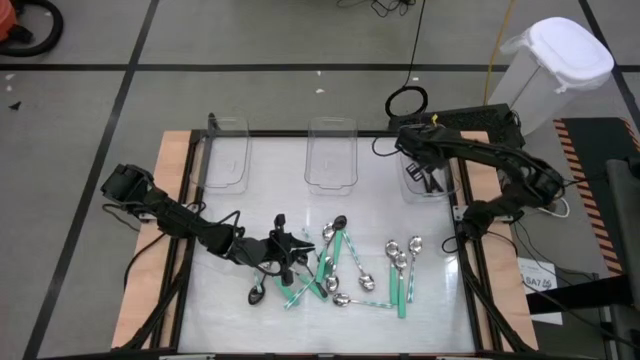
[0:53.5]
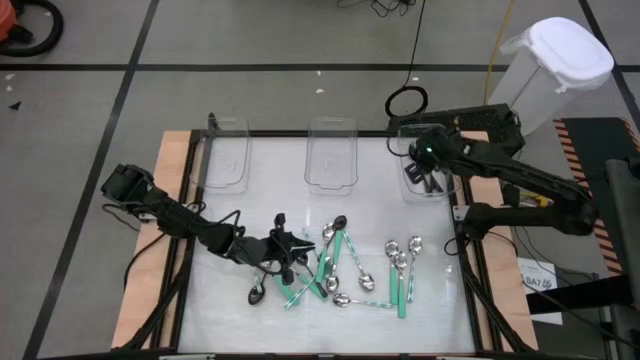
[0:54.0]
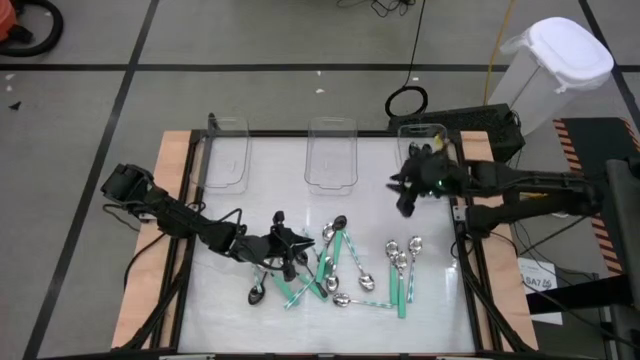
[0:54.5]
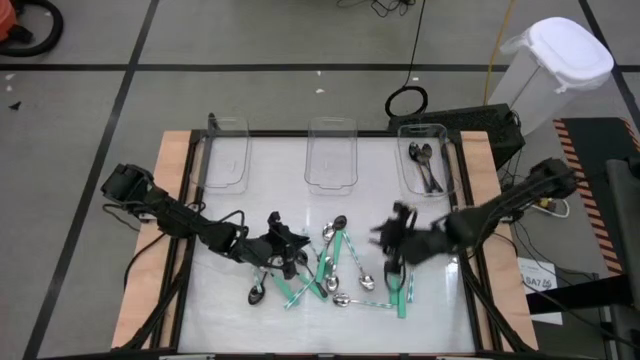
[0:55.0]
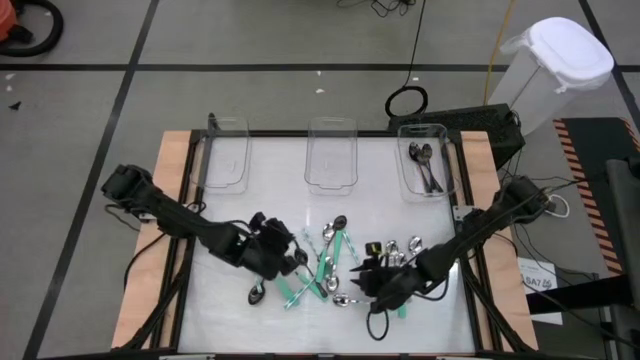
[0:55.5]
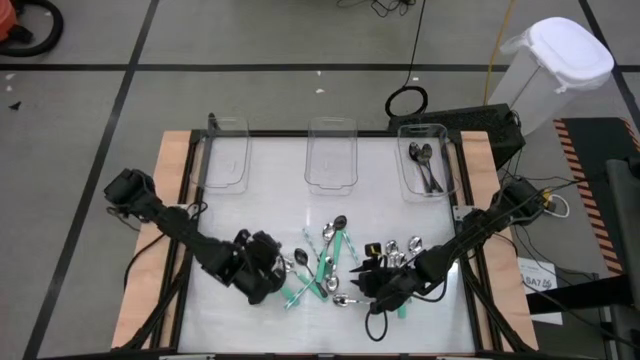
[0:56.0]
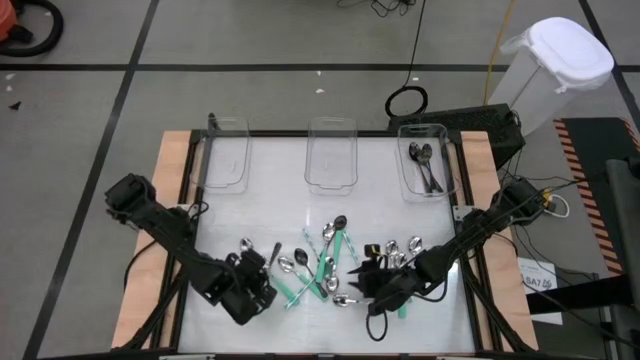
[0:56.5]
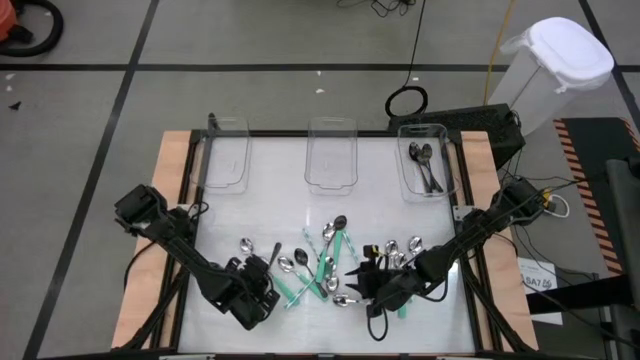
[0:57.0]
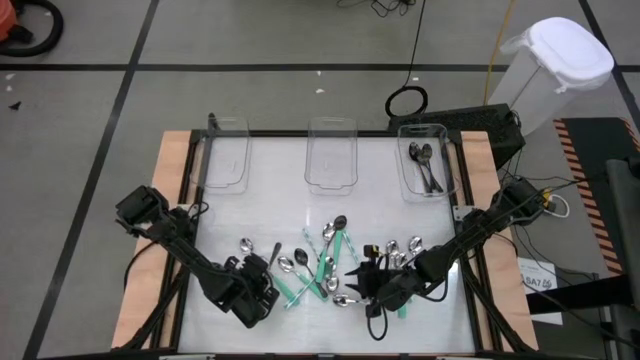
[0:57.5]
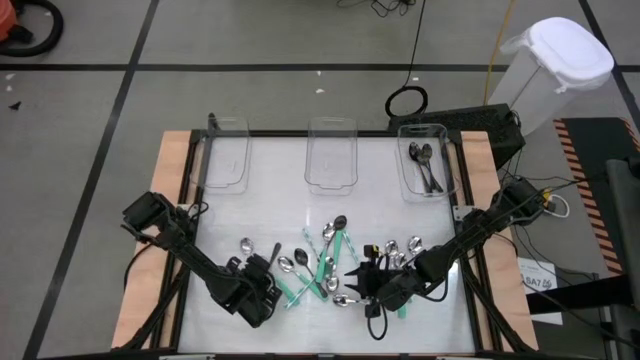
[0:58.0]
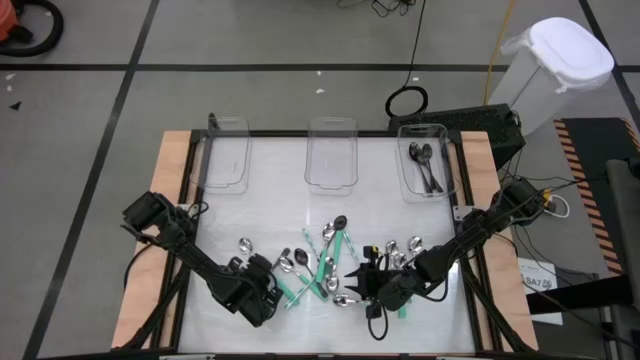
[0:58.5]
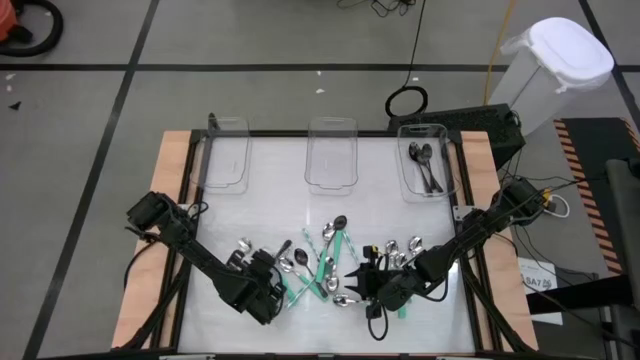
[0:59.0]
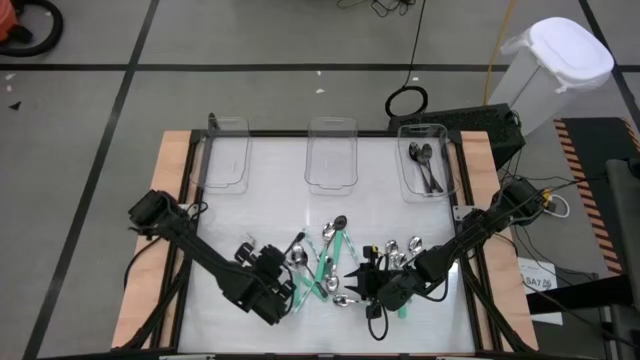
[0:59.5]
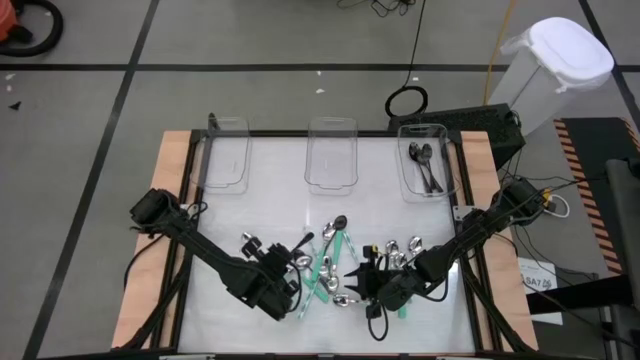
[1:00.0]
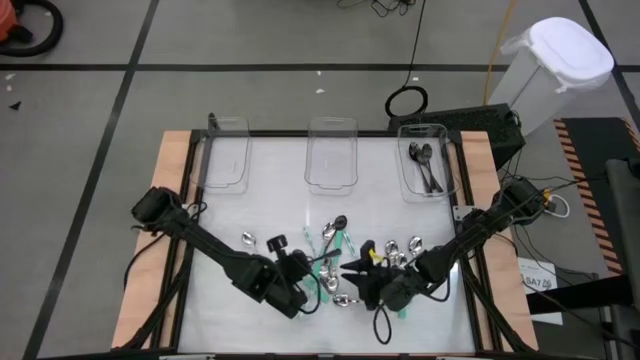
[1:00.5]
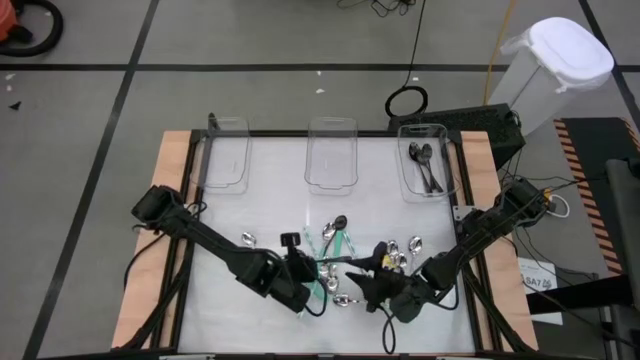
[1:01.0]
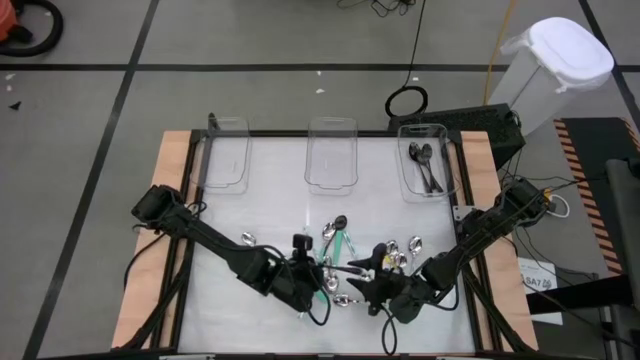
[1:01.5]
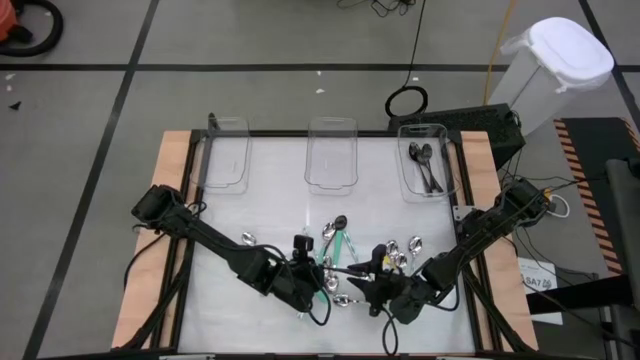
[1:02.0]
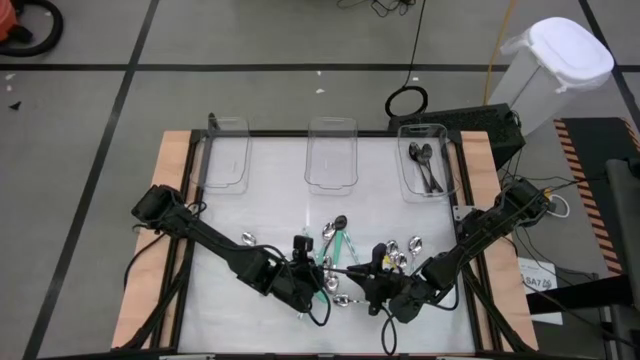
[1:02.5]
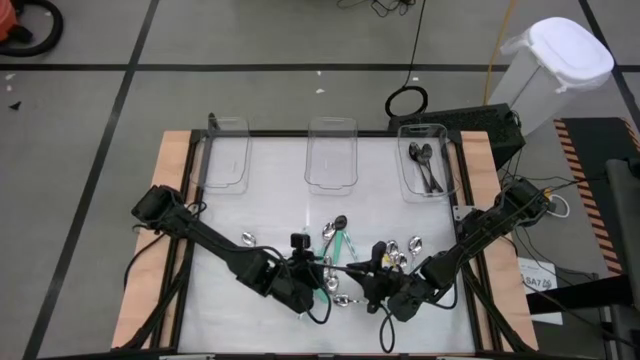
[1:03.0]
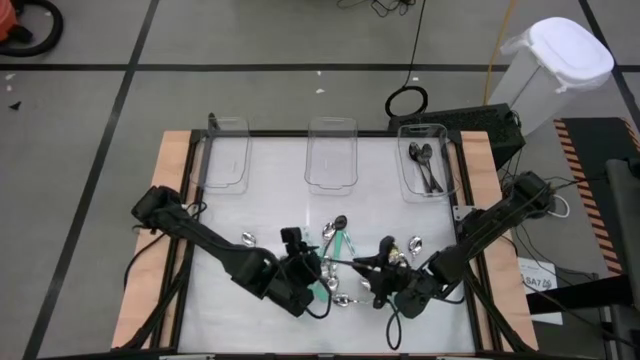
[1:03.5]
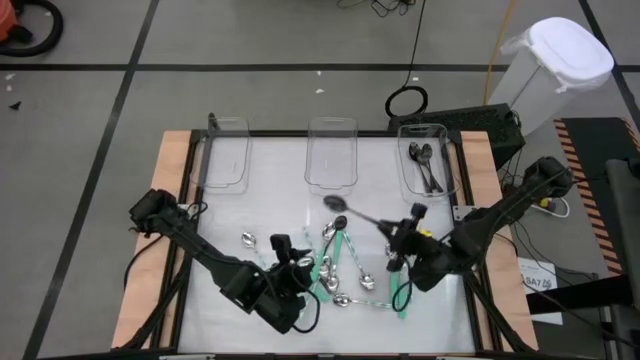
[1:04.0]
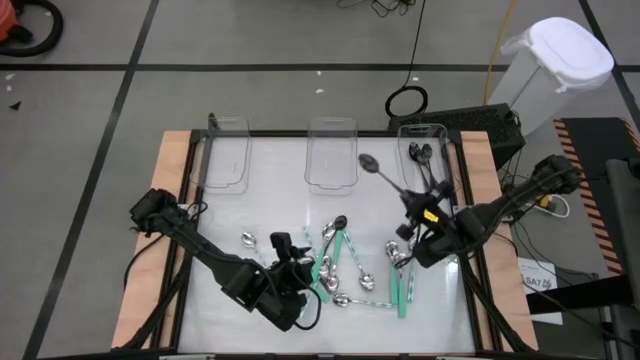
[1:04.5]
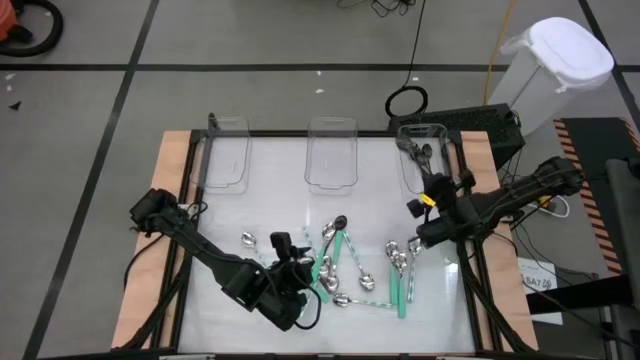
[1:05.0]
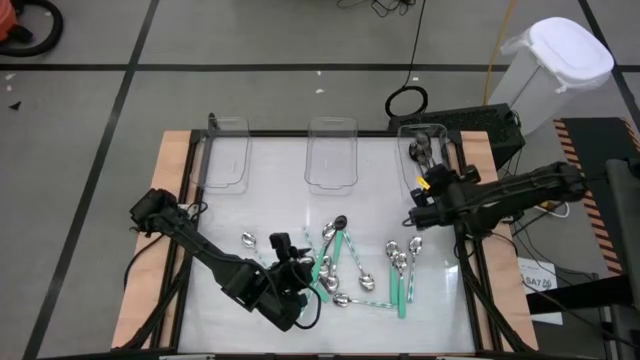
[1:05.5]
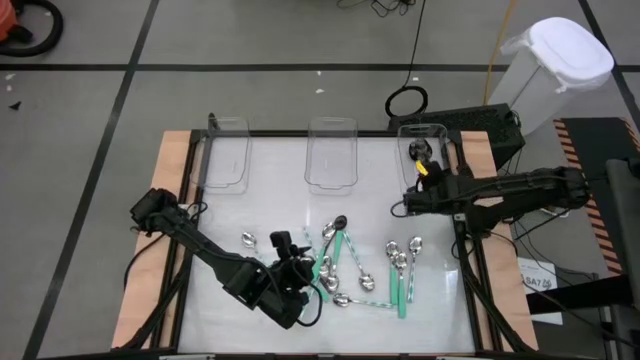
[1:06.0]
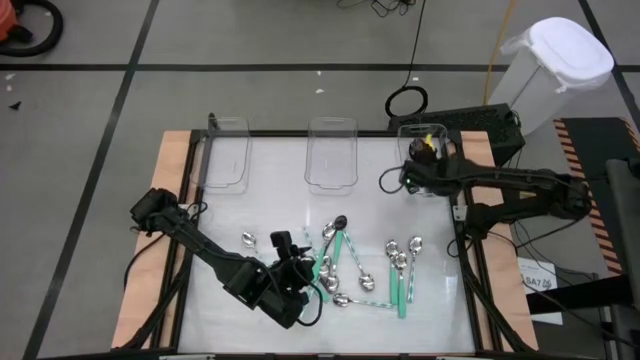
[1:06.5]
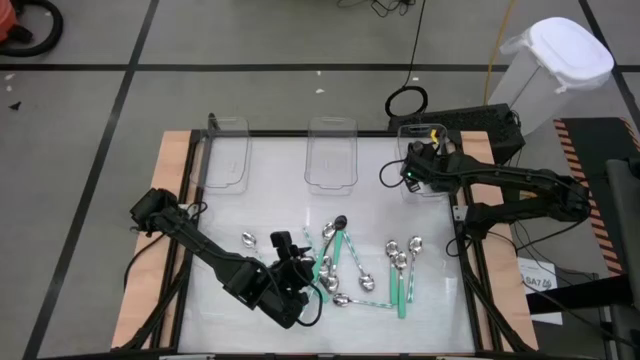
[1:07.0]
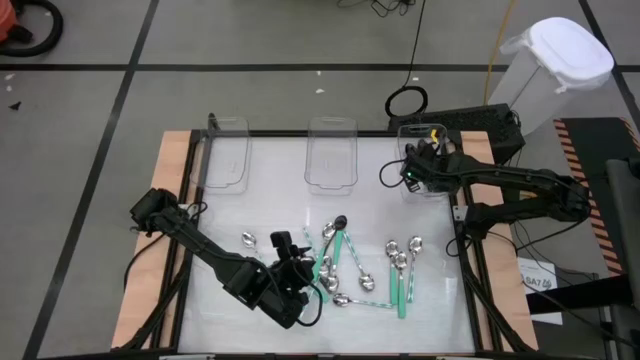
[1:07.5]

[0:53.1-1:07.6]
Task: Sort silverware by color (type)
Put the black spoon into the right transparent bin
